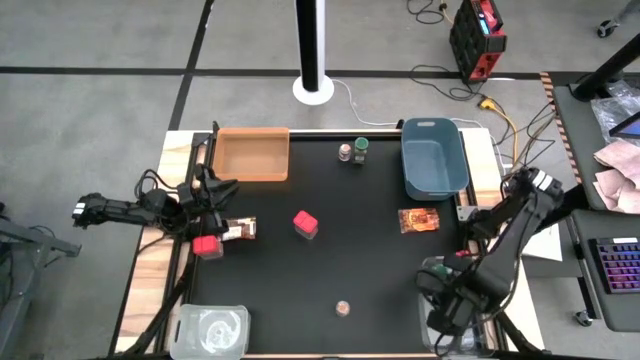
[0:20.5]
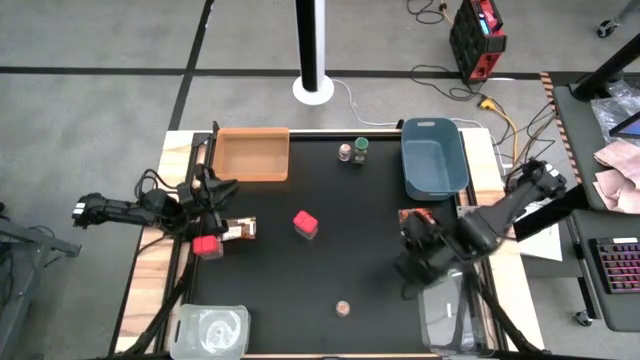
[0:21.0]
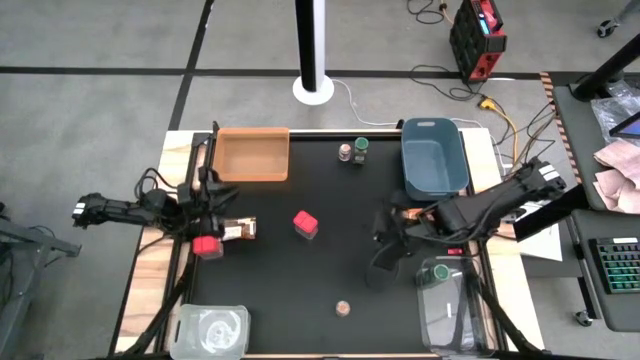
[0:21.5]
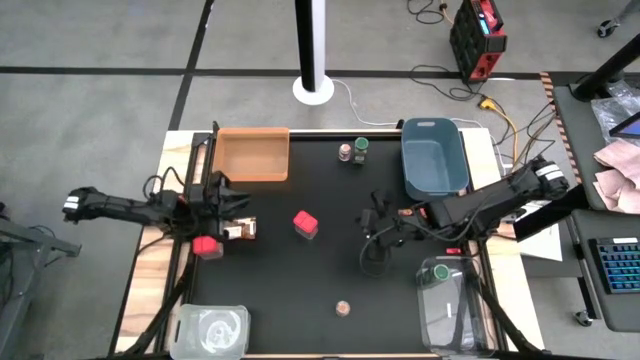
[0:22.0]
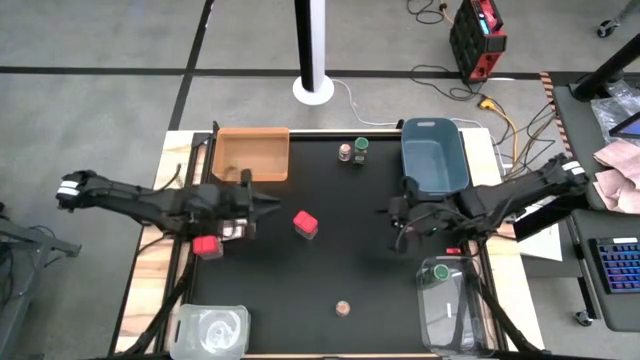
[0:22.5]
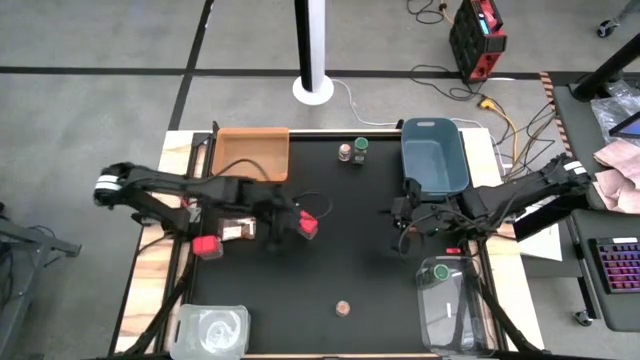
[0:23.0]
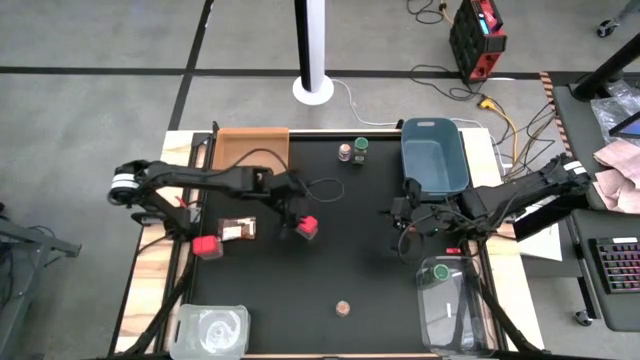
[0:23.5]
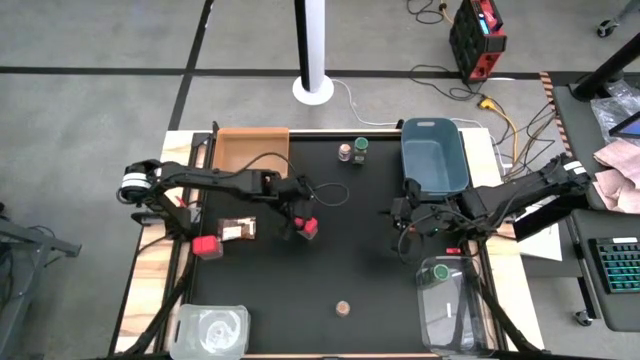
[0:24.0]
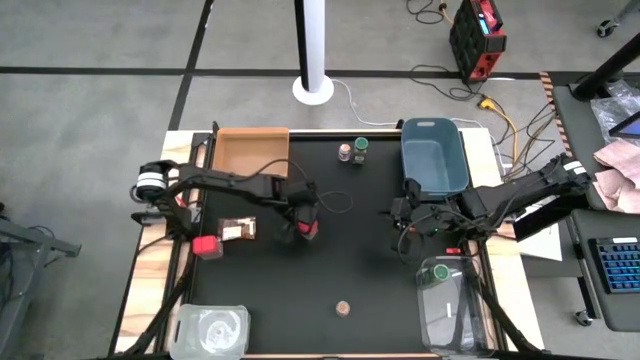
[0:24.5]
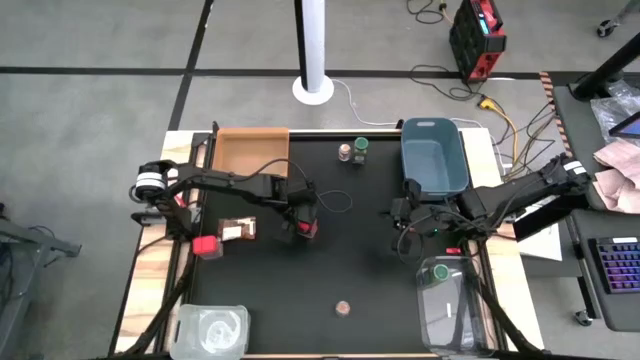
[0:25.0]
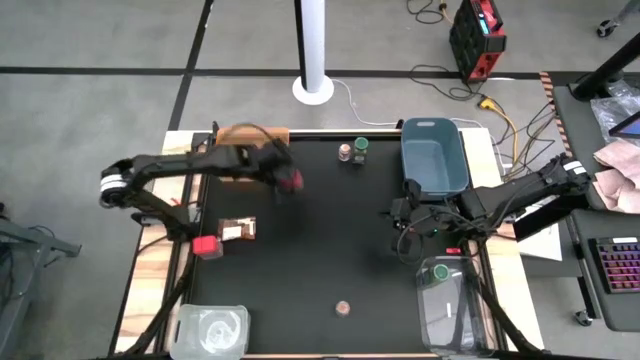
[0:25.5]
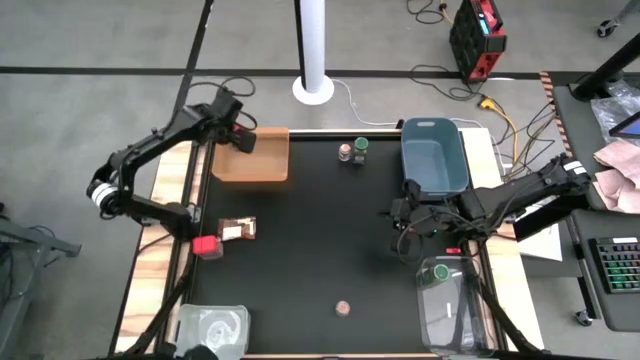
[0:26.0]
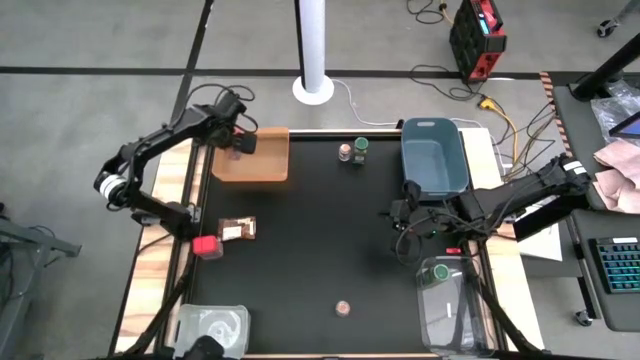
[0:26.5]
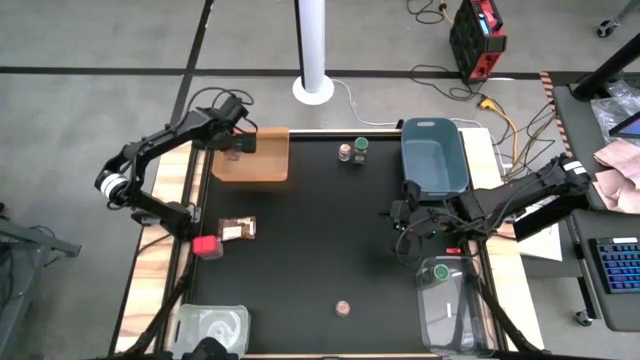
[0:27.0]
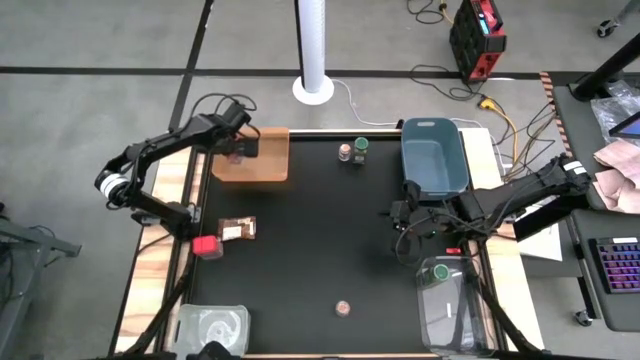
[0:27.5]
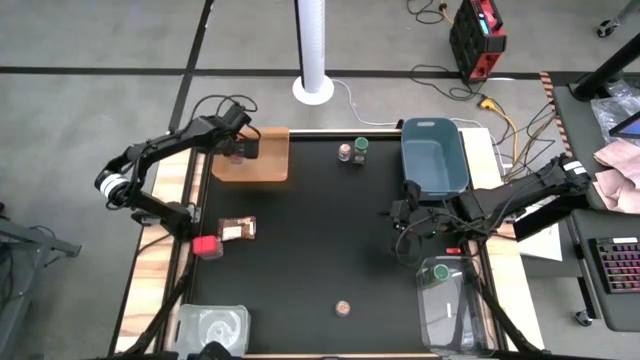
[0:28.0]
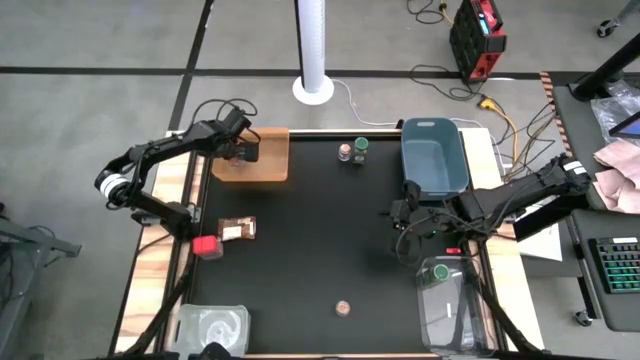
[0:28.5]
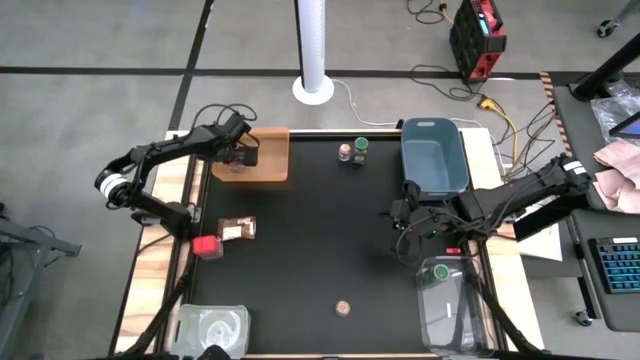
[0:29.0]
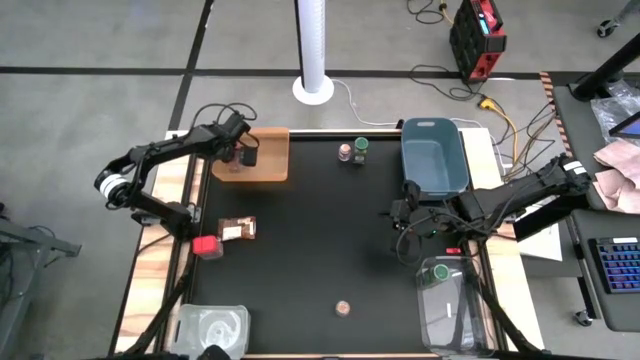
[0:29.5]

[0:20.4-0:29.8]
Task: Sort spices by type
Put the right red seasoning can into the orange bin

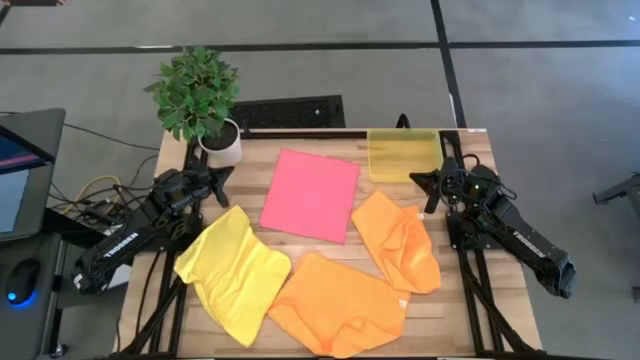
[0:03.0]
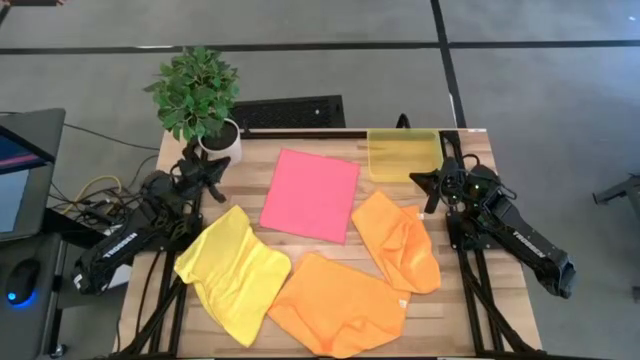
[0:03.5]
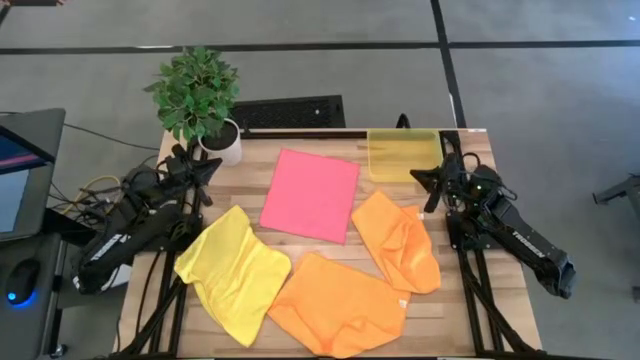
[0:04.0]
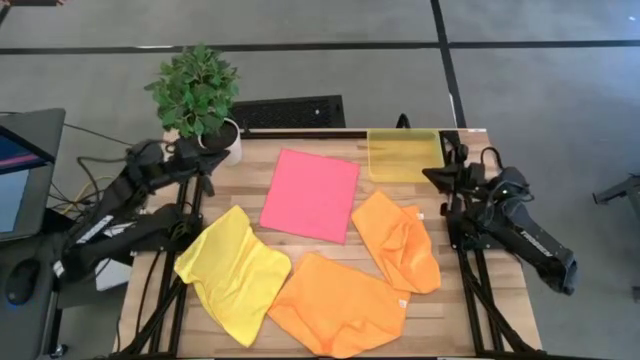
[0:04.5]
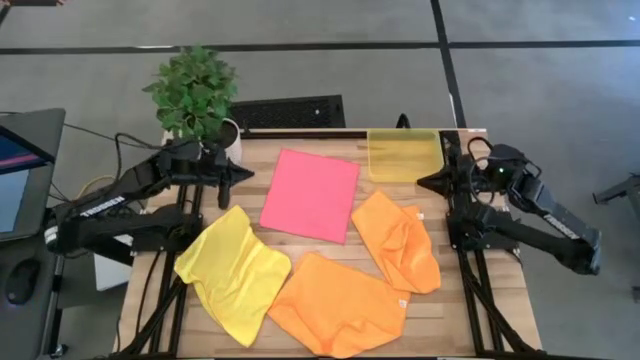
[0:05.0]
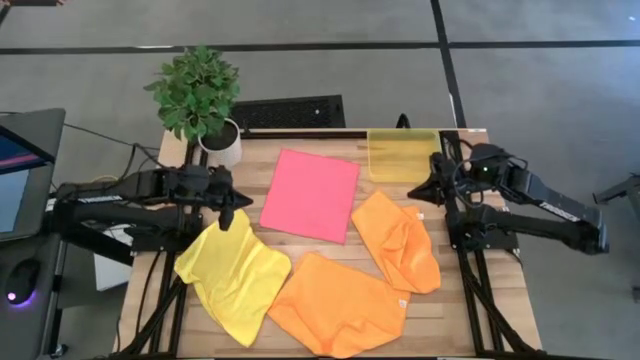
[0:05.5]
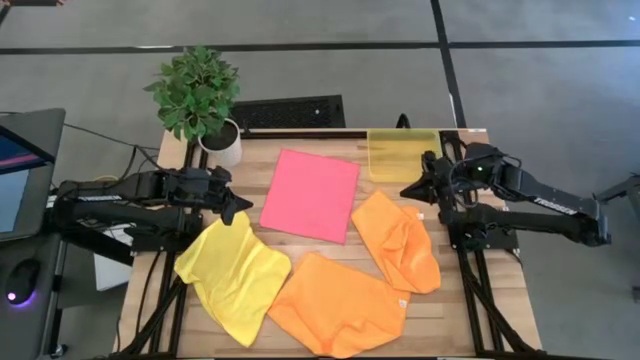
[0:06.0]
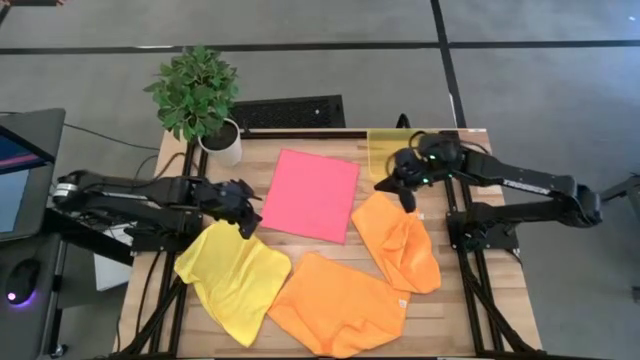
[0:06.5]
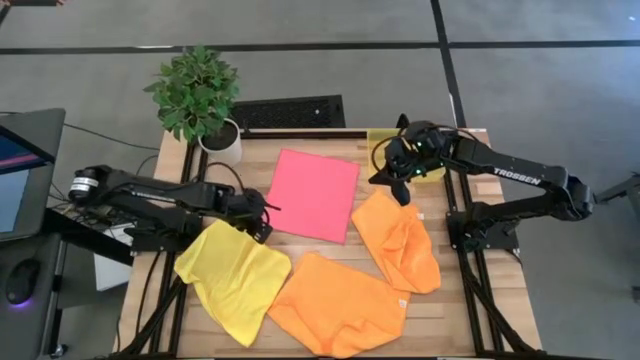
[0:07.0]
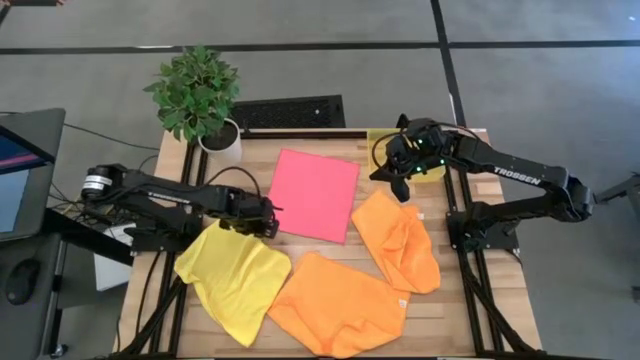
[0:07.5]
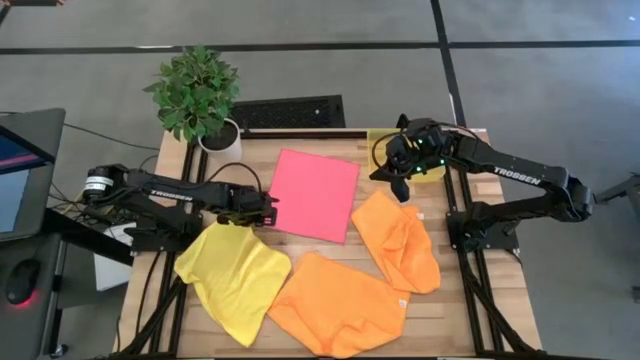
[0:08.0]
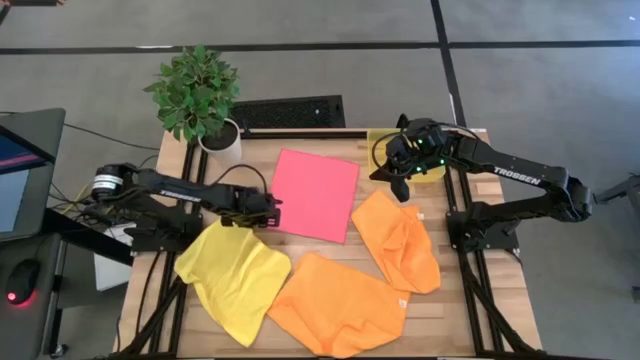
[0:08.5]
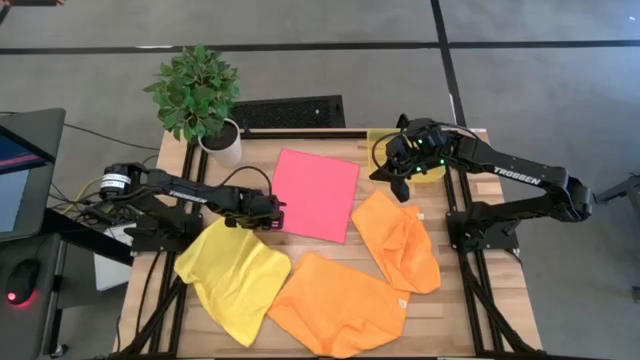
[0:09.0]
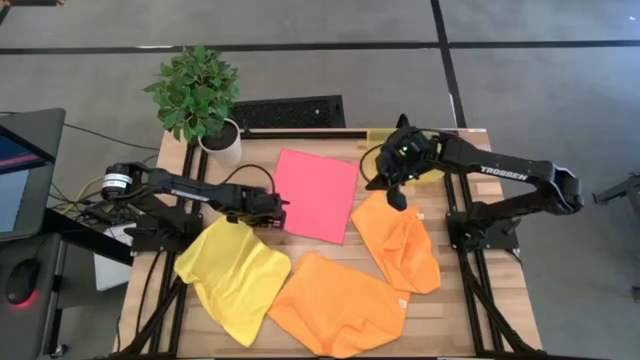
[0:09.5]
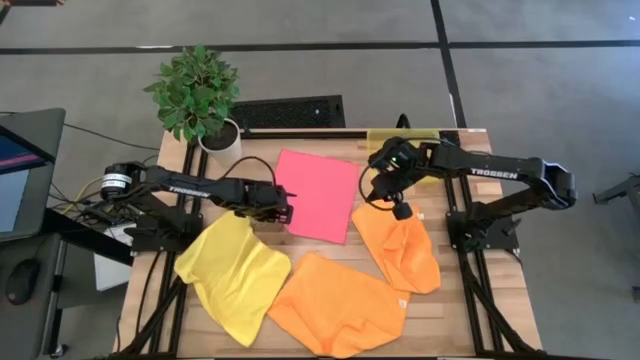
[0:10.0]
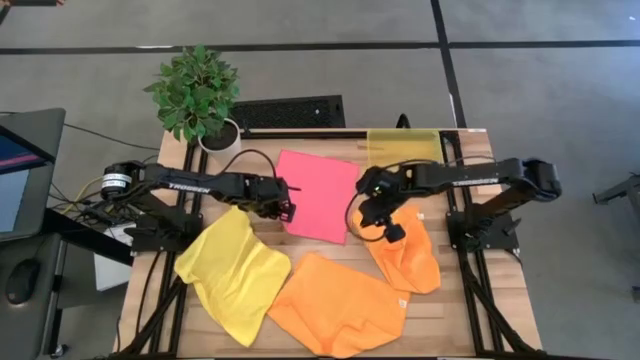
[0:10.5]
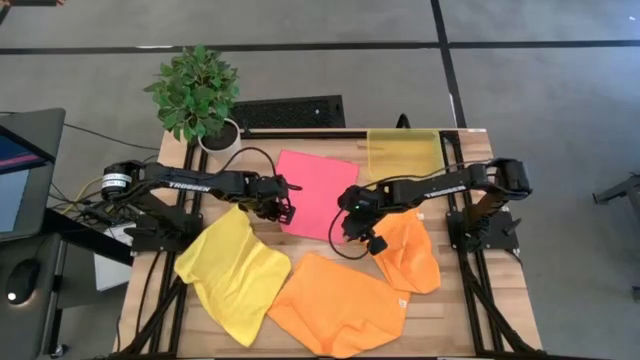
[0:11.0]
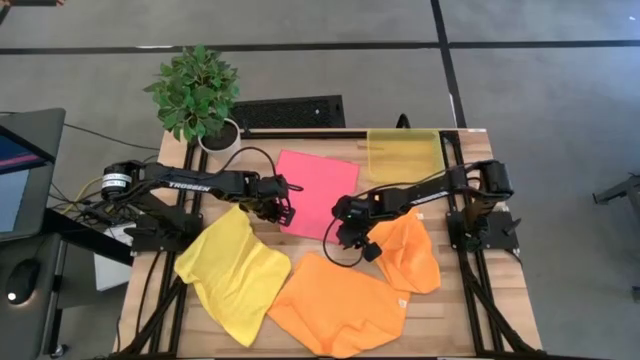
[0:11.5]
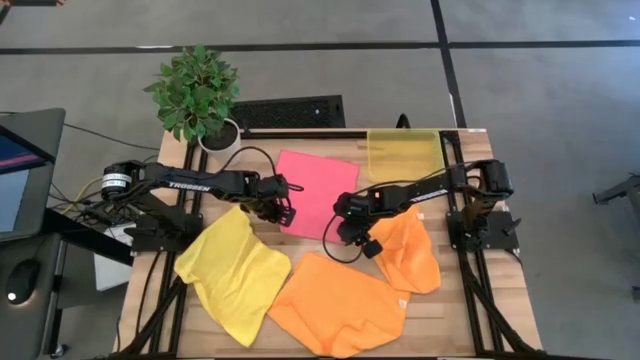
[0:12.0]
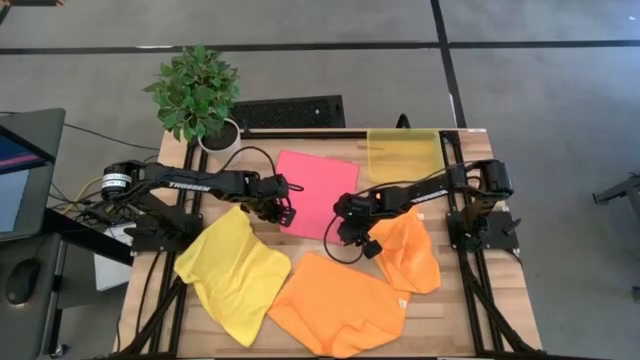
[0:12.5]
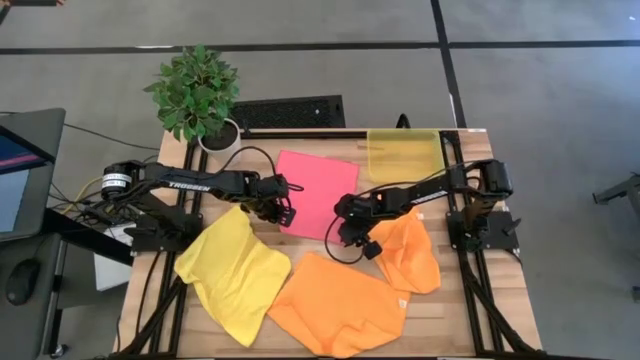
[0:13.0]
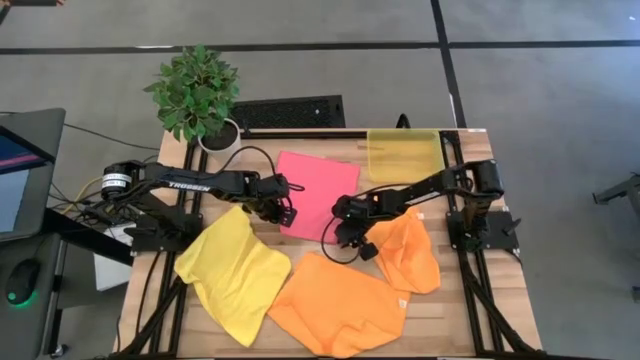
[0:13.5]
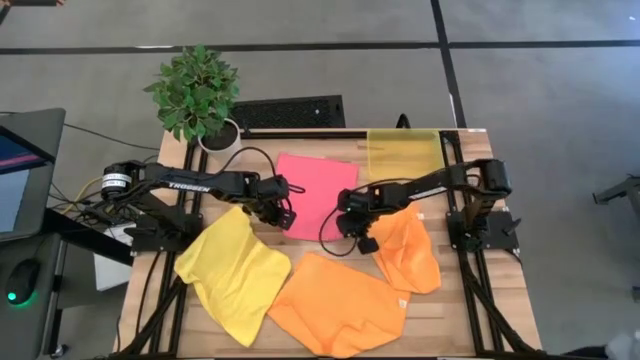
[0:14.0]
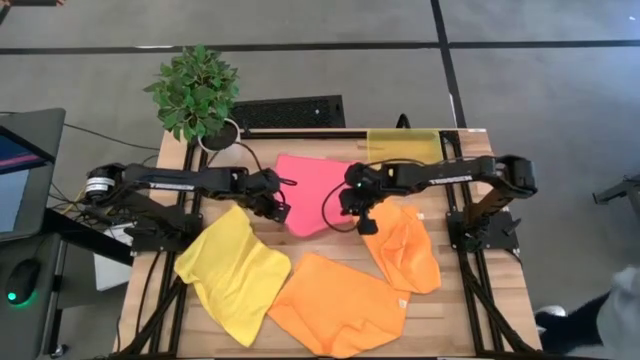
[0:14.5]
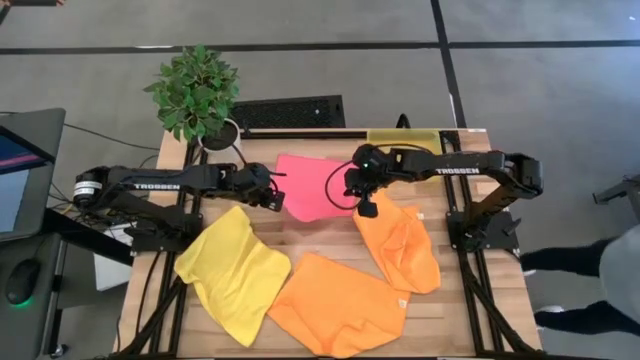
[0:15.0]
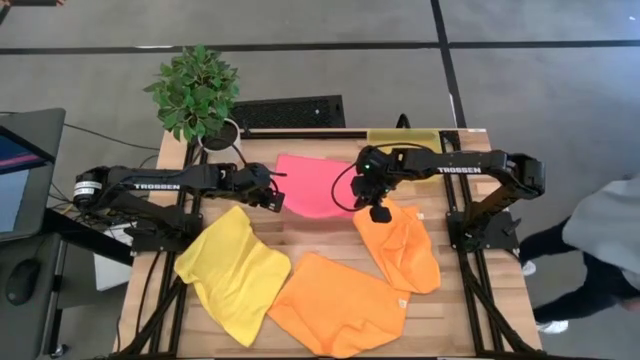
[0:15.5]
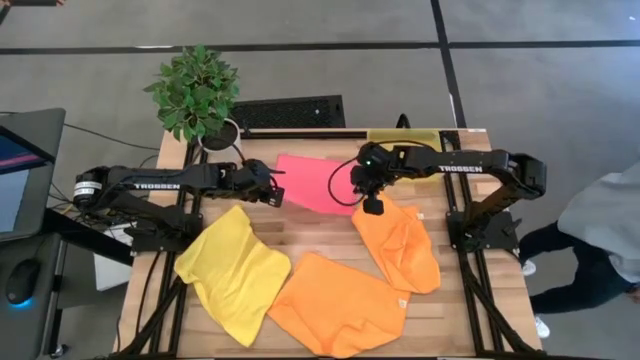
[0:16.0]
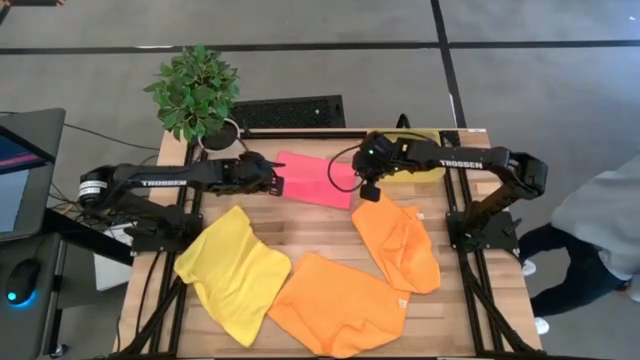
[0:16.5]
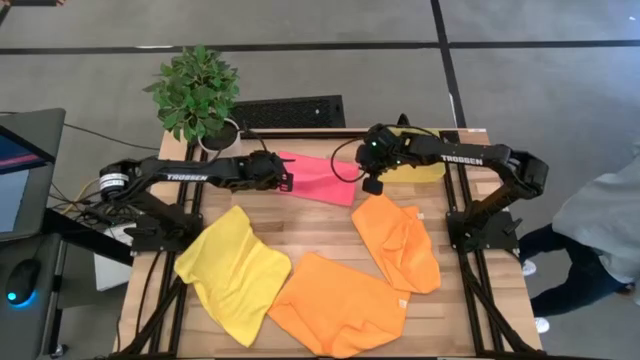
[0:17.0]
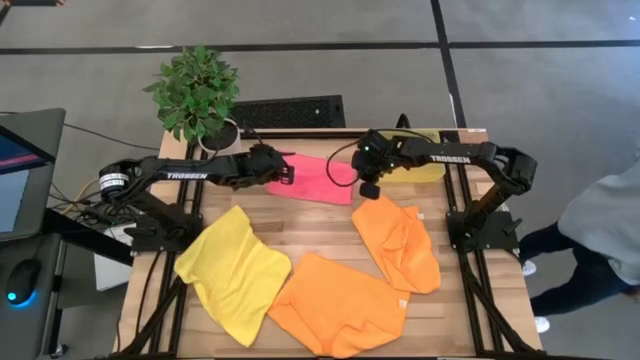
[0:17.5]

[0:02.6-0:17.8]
Task: Fold microfiber towels
Fold the pink microfiber towel
